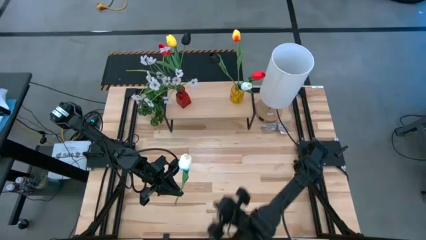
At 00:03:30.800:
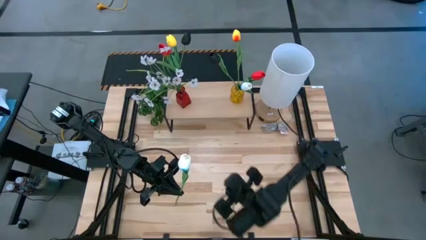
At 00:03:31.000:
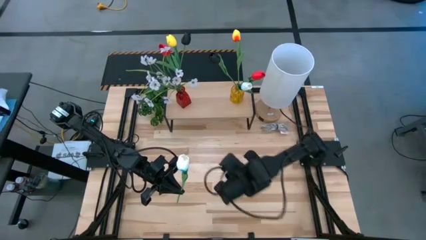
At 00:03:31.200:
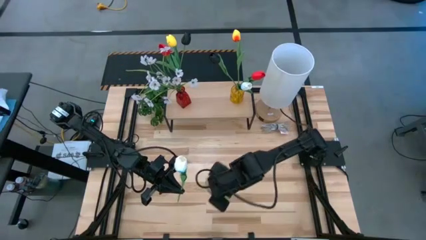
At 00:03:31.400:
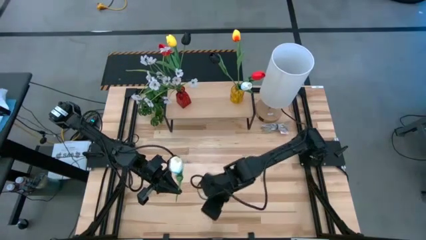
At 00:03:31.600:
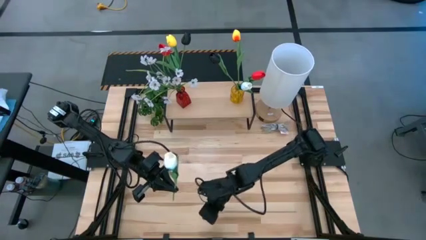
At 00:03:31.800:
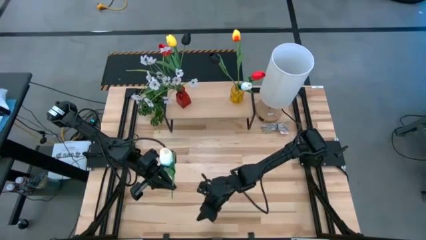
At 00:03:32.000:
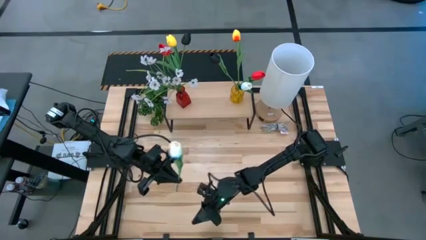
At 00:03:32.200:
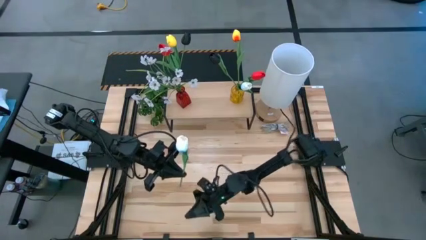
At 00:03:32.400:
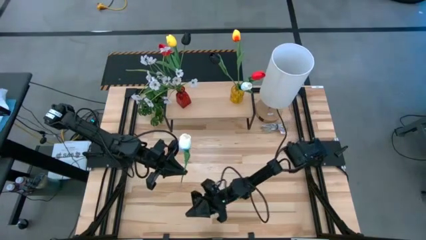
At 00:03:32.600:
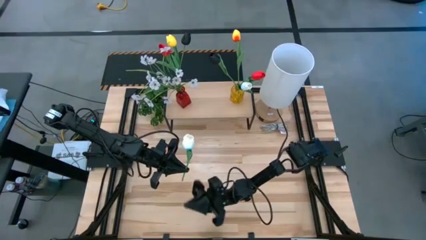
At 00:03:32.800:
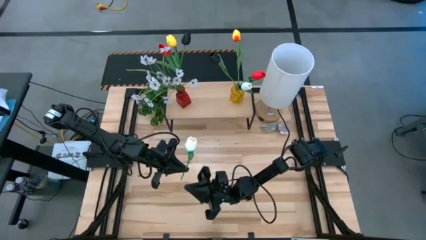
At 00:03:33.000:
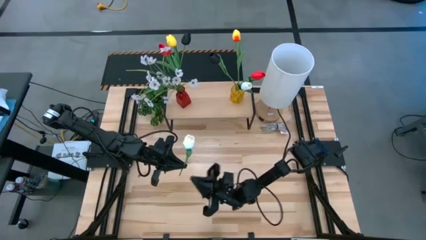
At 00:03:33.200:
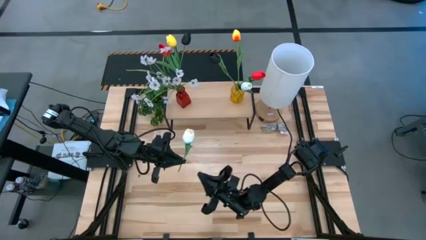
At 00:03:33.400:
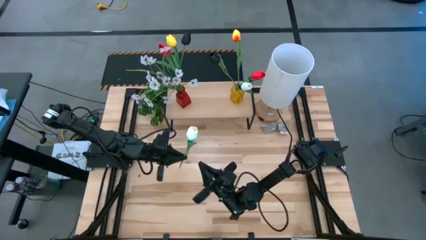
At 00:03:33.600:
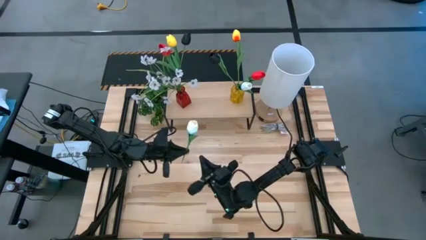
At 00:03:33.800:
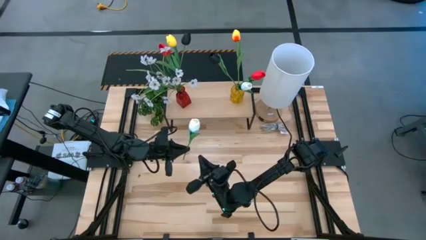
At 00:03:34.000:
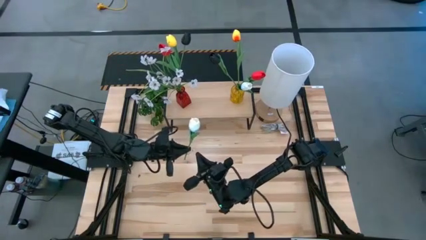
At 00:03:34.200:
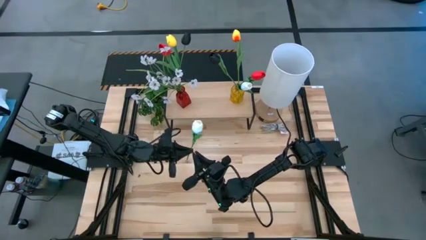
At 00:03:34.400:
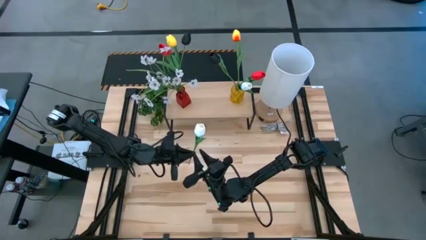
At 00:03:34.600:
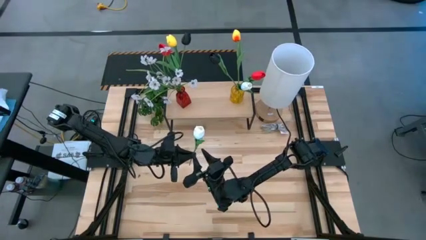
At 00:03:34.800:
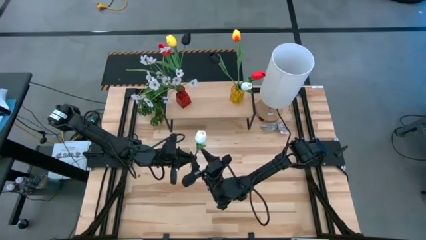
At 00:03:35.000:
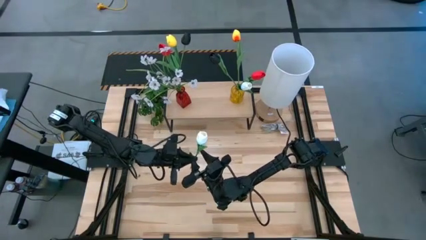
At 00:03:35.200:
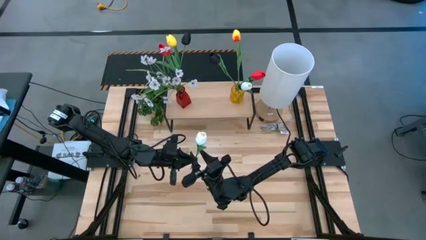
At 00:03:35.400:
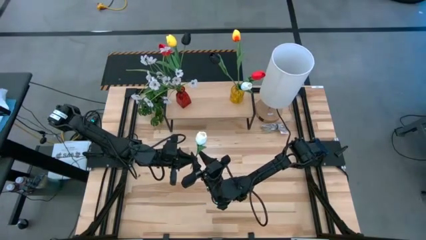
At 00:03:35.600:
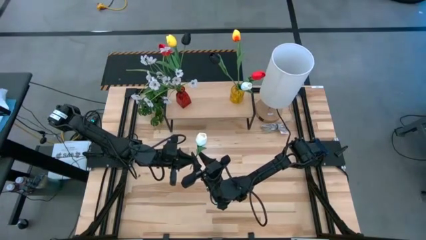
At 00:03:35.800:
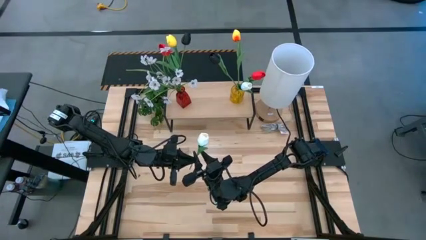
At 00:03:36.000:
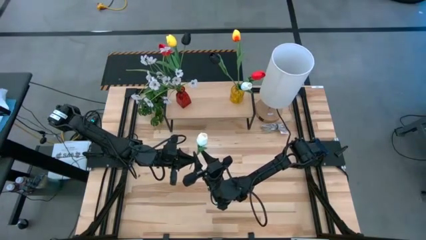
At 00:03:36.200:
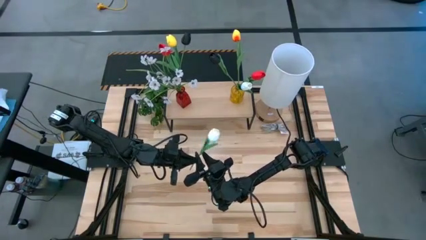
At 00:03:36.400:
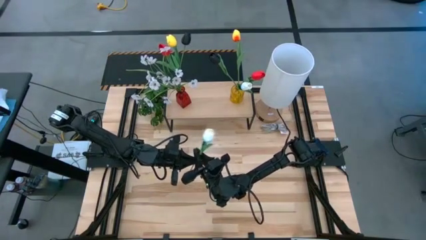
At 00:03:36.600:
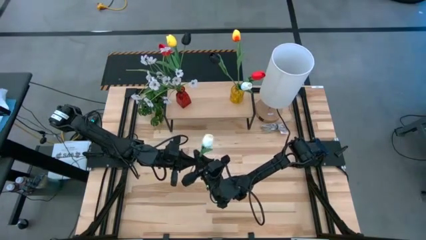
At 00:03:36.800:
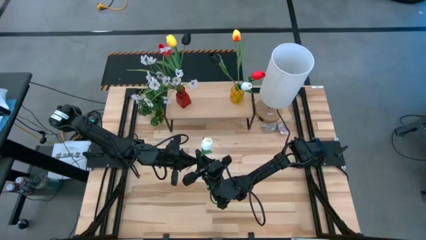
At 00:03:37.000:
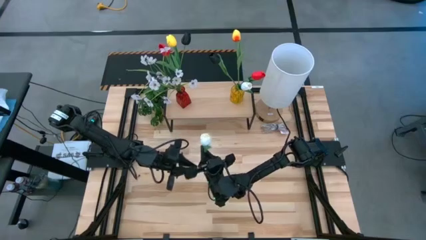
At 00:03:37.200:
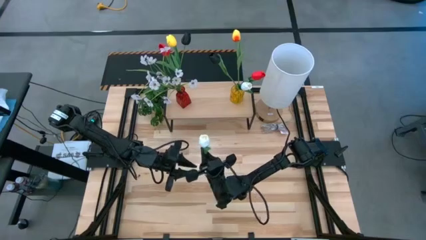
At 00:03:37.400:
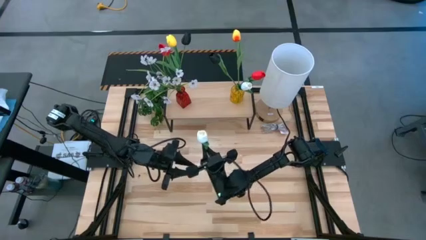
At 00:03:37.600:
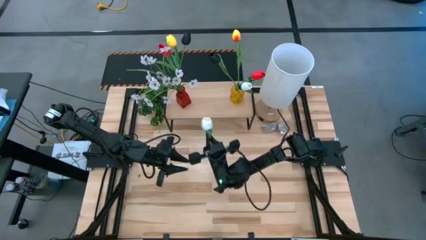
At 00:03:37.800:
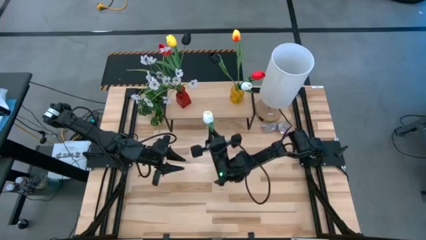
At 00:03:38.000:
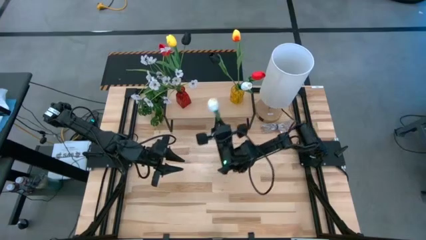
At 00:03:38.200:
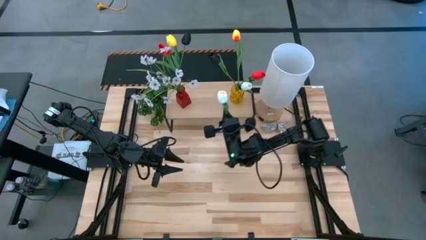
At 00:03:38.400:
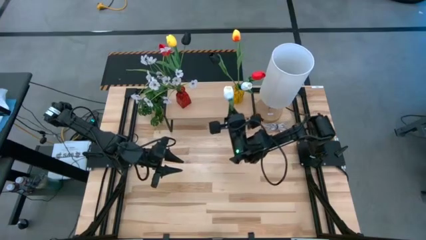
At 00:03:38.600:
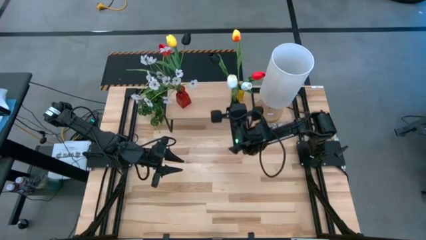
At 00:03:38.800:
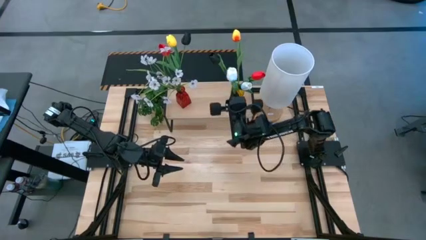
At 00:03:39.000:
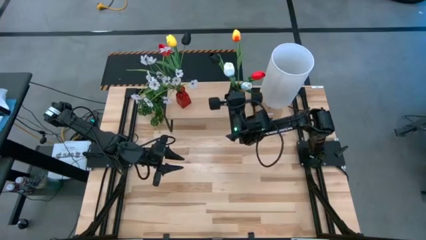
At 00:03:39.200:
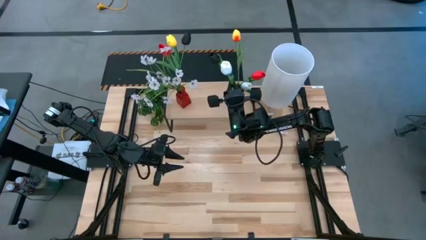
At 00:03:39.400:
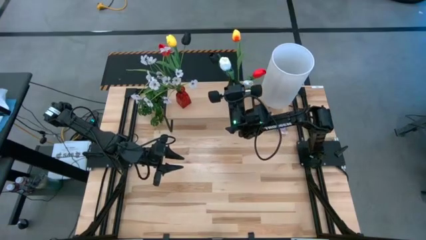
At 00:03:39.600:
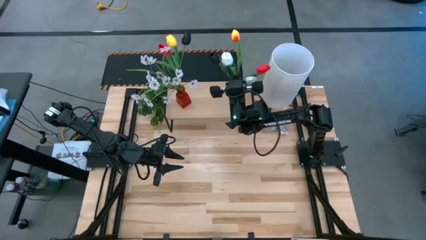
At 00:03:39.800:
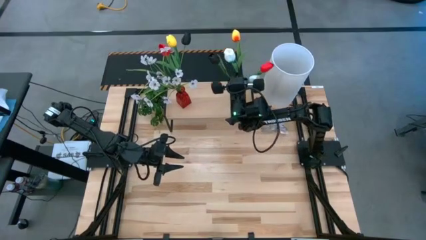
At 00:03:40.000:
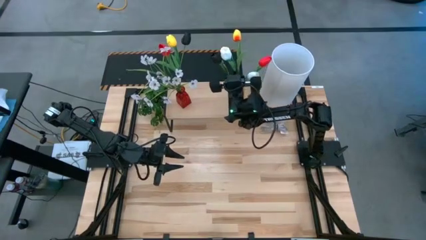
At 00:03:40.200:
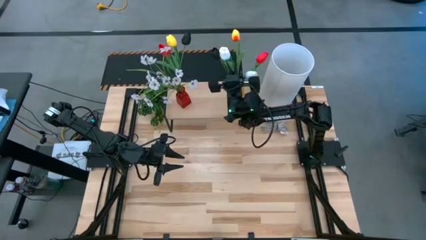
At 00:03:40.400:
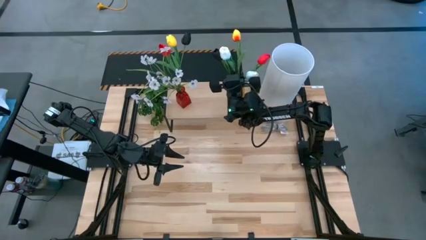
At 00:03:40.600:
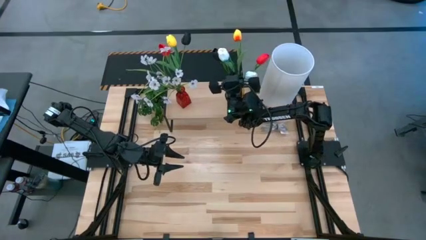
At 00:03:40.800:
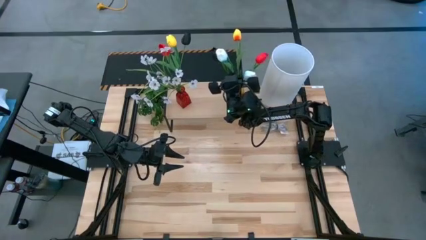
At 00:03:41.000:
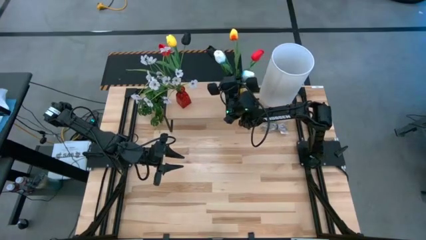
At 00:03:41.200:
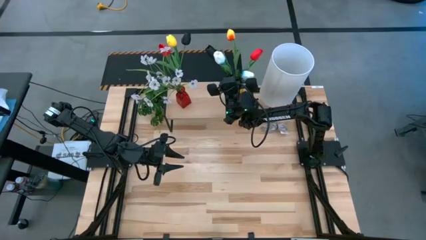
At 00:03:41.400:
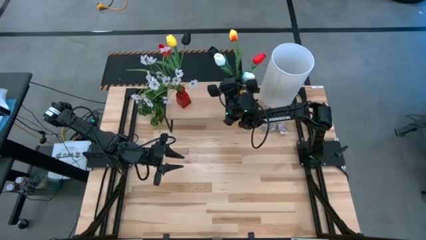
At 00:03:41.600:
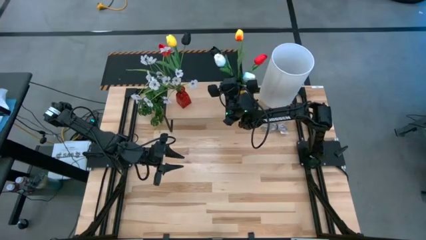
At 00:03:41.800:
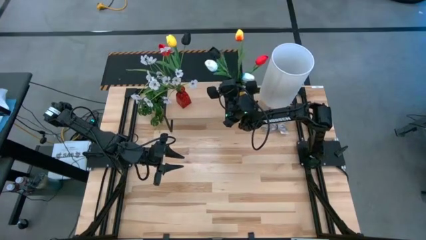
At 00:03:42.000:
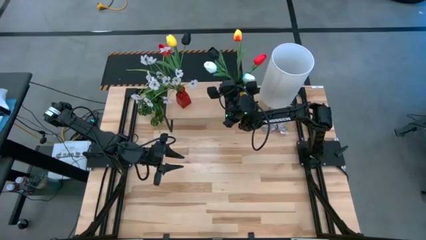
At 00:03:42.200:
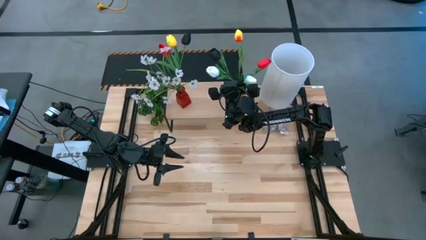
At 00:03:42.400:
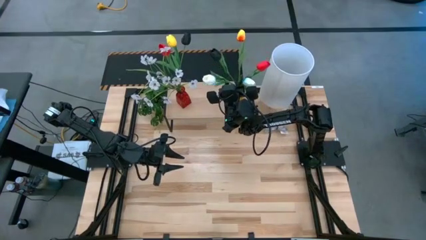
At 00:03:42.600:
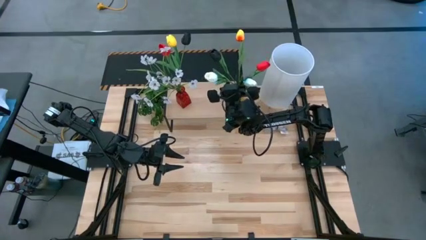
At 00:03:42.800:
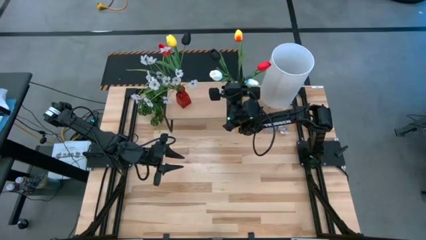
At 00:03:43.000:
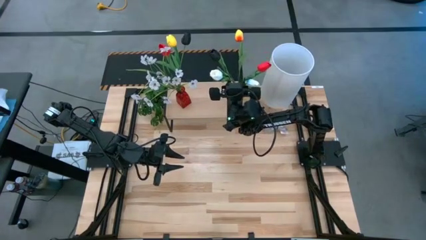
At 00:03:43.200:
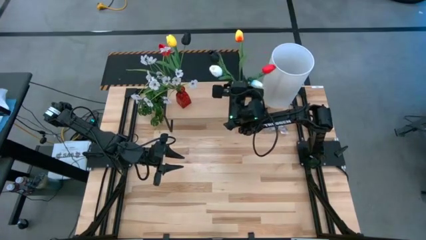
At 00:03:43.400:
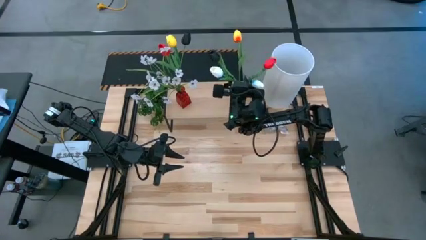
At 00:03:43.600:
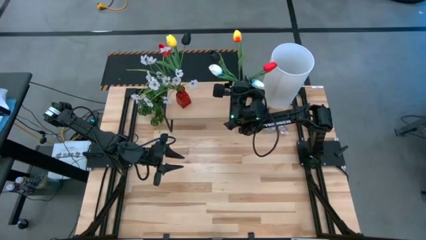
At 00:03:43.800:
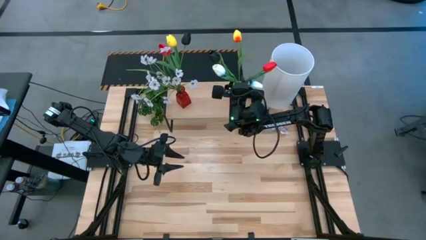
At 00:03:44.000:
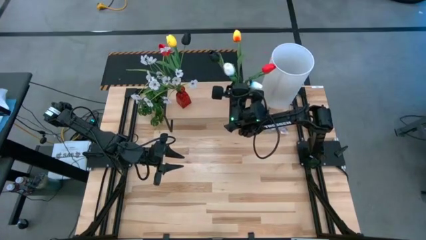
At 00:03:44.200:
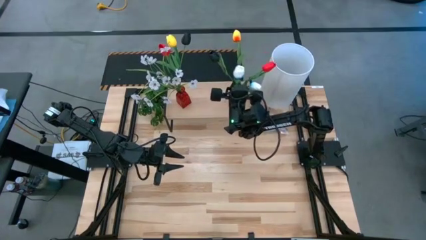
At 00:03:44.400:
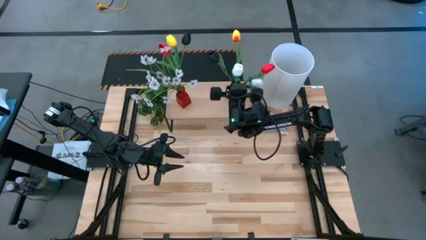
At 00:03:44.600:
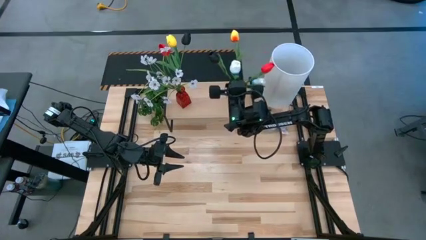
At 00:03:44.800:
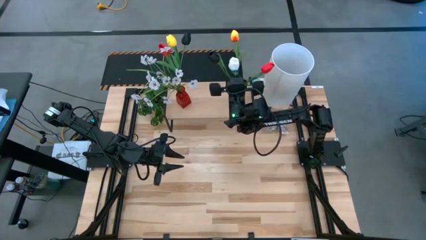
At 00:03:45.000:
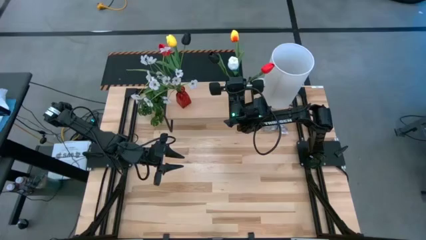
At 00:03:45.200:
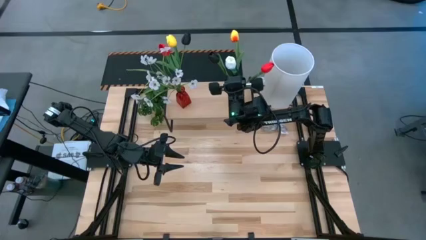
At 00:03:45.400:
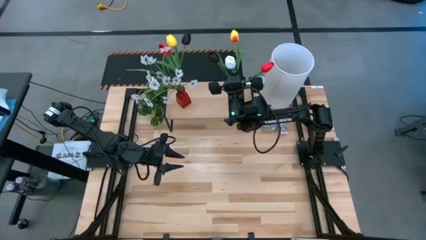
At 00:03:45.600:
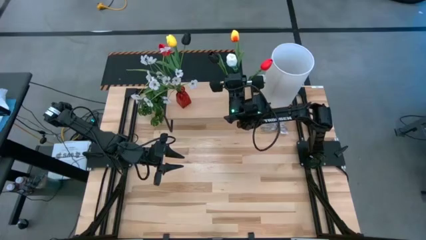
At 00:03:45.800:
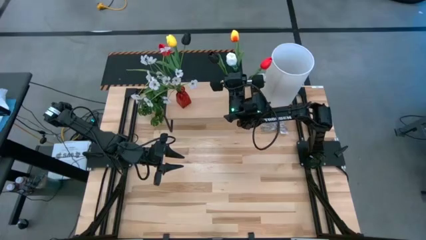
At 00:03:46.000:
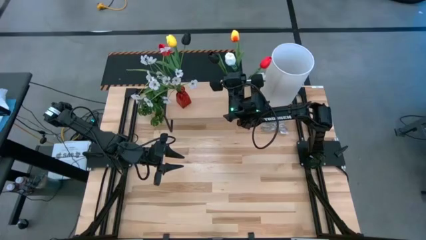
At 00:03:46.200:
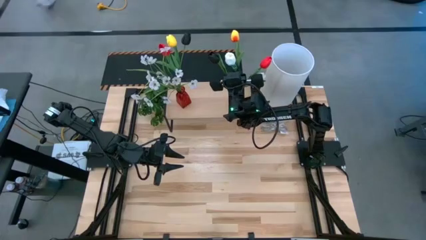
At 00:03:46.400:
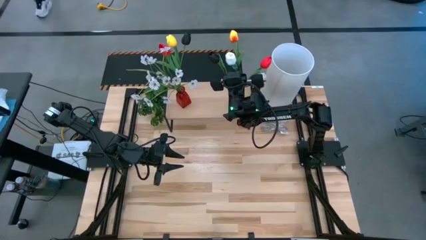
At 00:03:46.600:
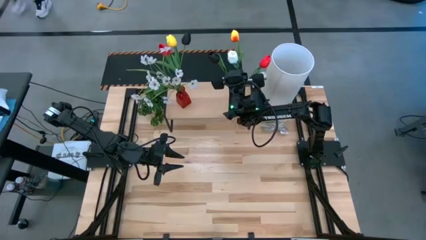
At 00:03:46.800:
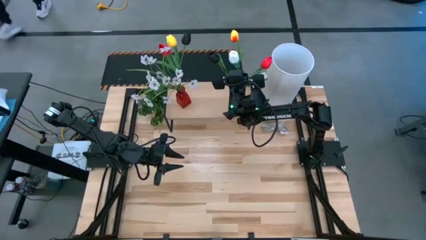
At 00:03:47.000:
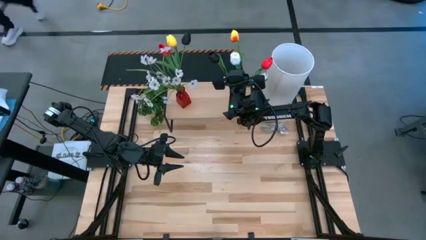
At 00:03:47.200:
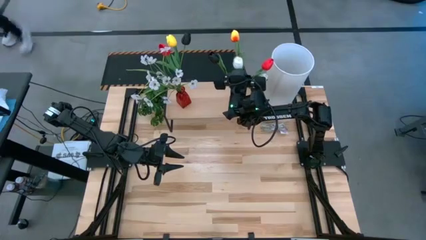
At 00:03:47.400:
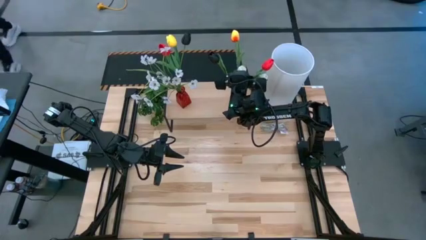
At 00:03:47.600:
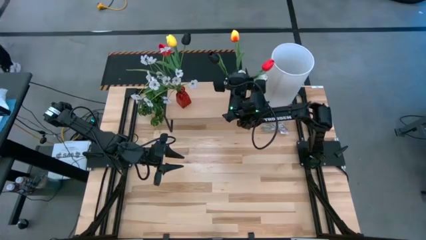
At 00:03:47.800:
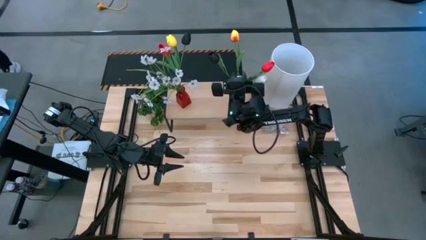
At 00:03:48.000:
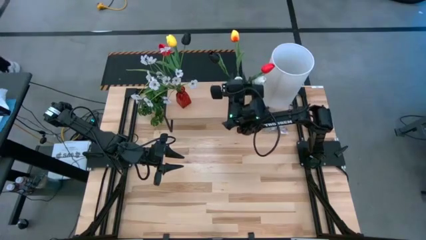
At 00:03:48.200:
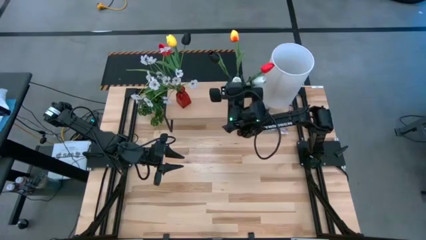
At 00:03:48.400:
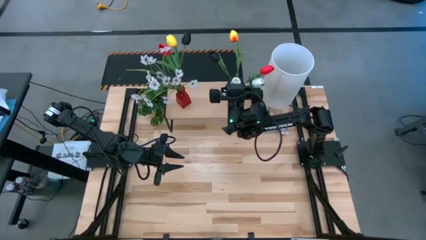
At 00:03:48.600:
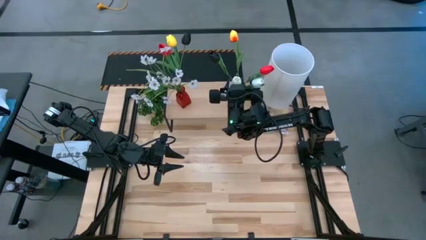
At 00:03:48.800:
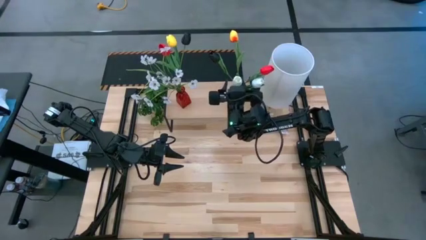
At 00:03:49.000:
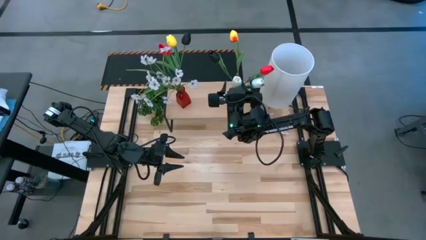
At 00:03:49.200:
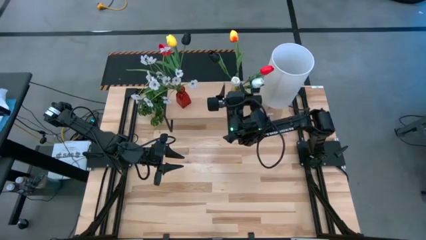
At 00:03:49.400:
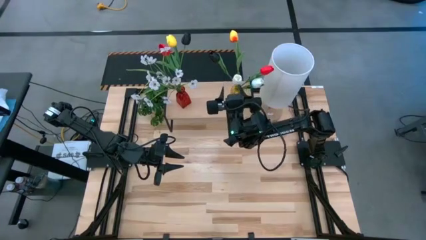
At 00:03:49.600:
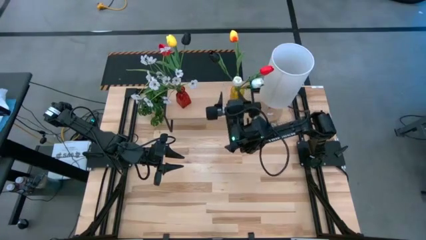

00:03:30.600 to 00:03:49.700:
Task: Pick and place flowers into a vace then onto a shelf
Put the white flower into the yellow vase on the shelf
